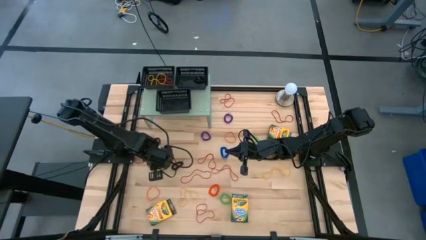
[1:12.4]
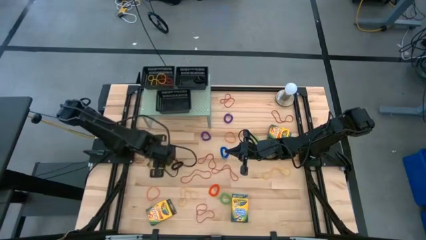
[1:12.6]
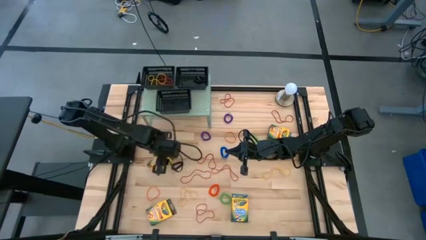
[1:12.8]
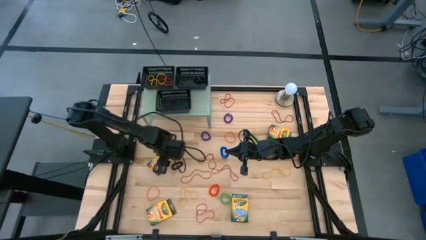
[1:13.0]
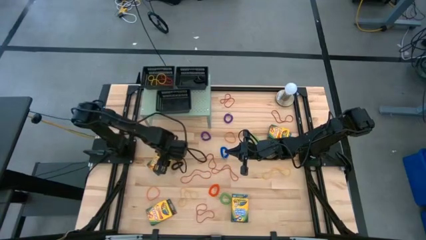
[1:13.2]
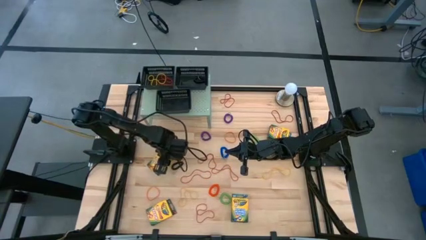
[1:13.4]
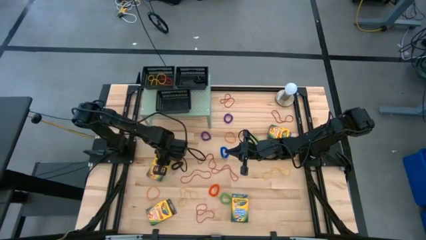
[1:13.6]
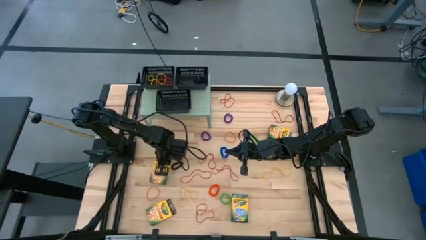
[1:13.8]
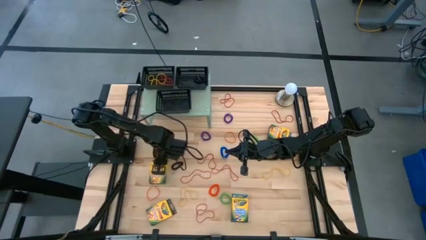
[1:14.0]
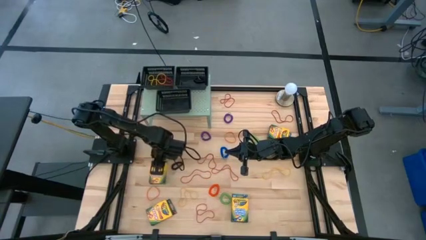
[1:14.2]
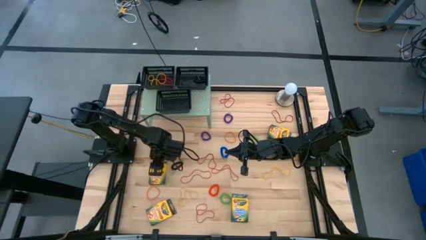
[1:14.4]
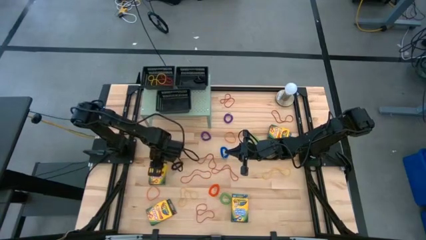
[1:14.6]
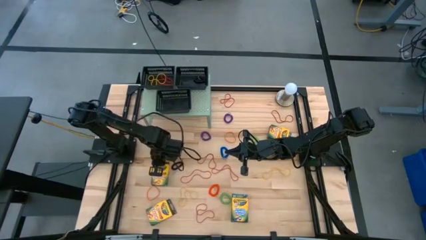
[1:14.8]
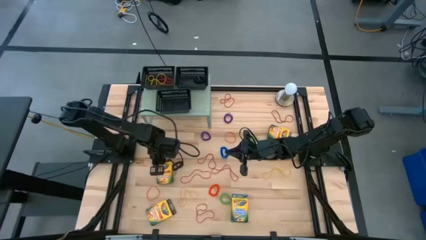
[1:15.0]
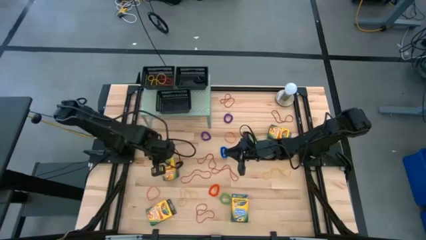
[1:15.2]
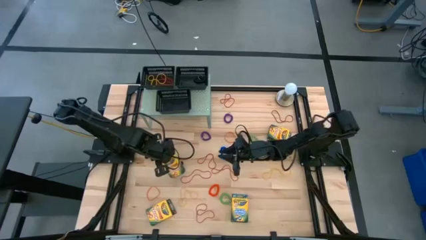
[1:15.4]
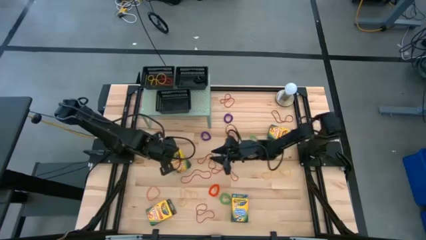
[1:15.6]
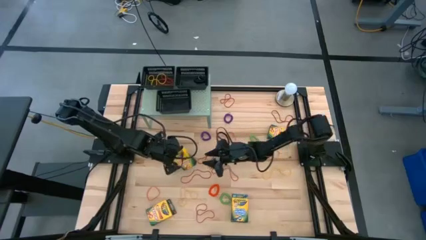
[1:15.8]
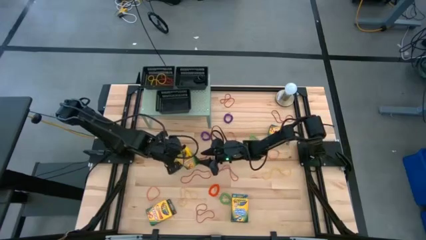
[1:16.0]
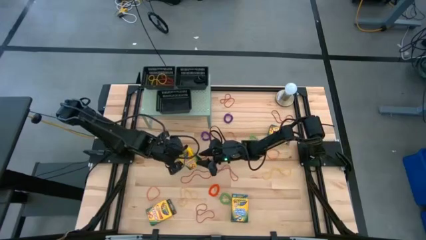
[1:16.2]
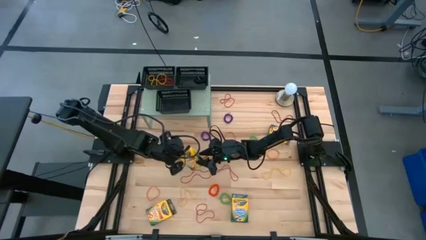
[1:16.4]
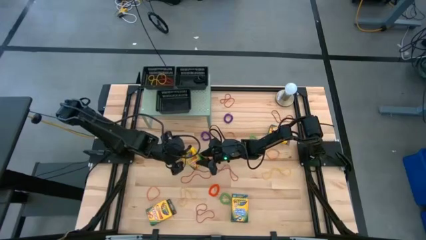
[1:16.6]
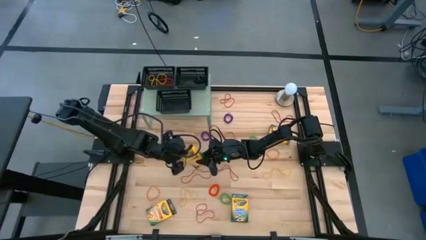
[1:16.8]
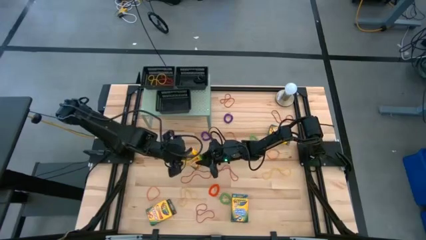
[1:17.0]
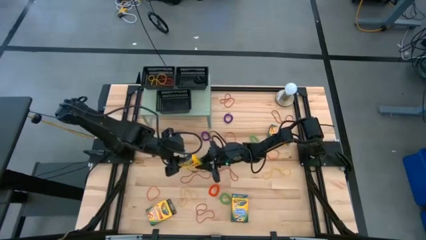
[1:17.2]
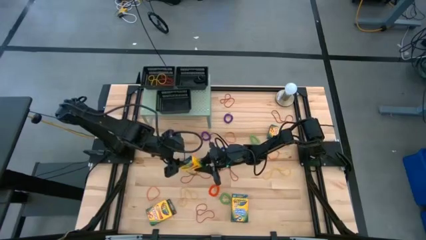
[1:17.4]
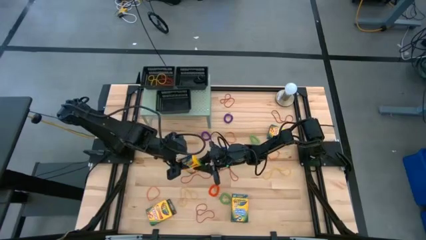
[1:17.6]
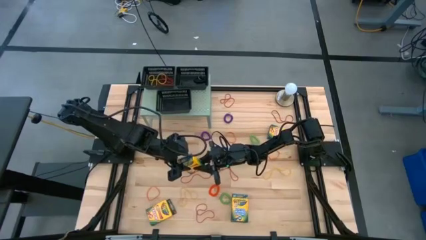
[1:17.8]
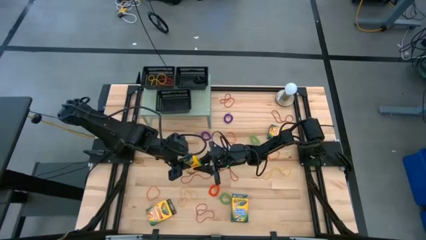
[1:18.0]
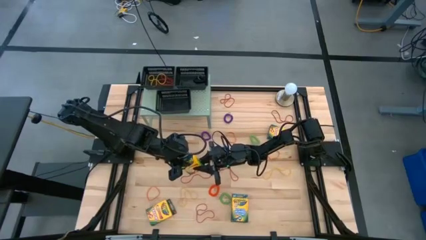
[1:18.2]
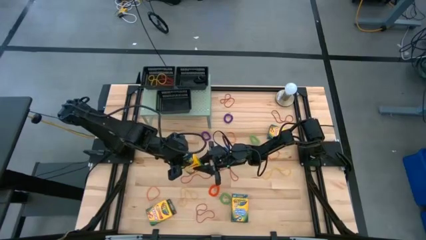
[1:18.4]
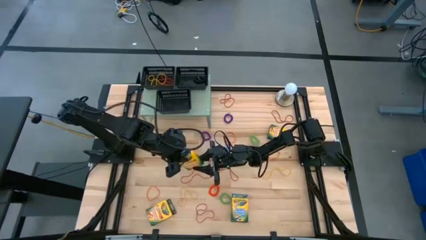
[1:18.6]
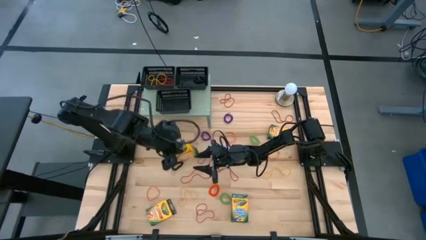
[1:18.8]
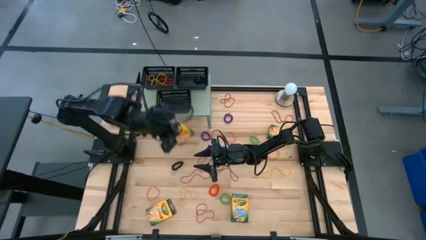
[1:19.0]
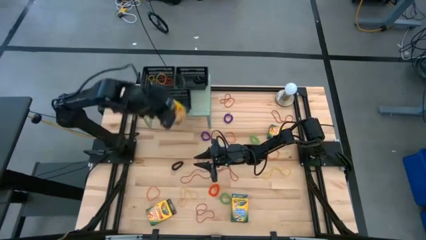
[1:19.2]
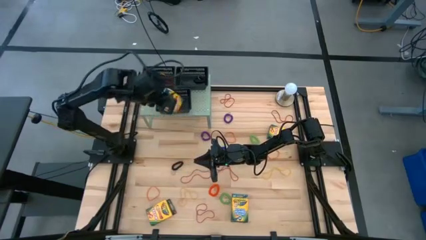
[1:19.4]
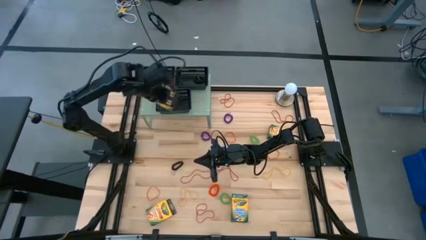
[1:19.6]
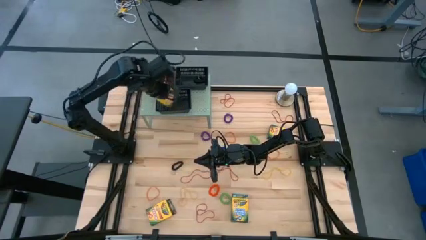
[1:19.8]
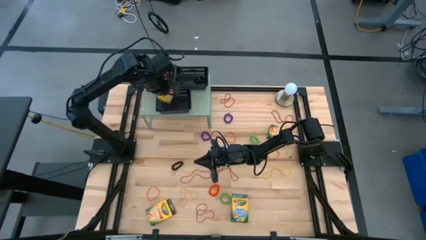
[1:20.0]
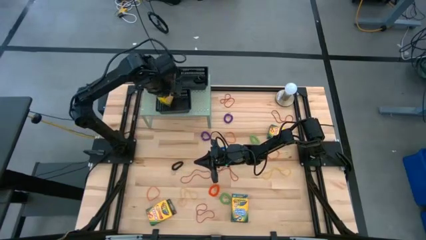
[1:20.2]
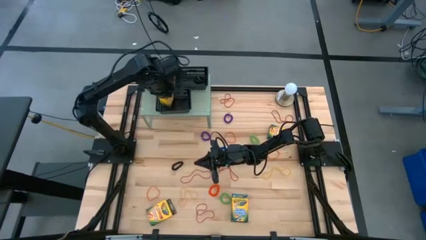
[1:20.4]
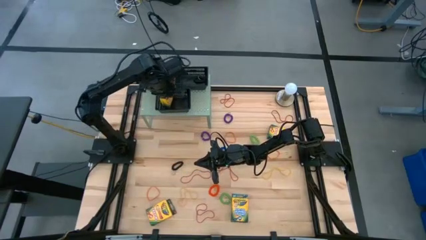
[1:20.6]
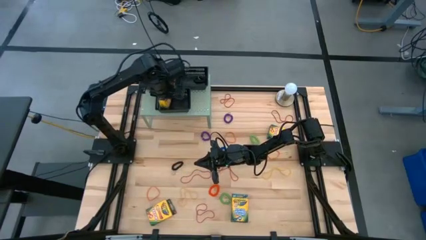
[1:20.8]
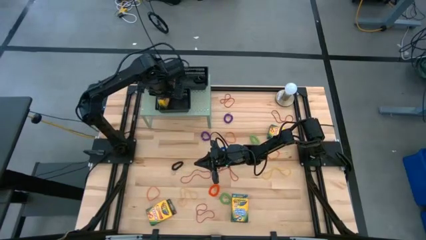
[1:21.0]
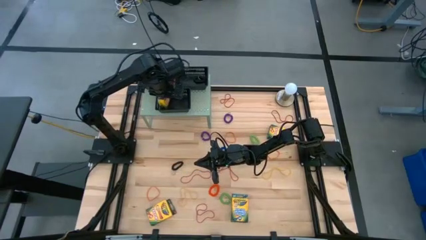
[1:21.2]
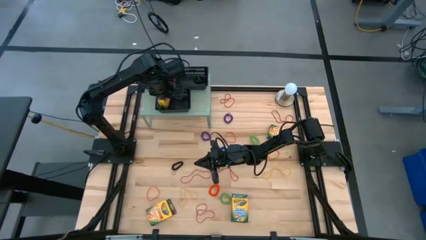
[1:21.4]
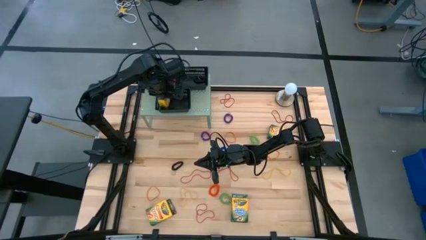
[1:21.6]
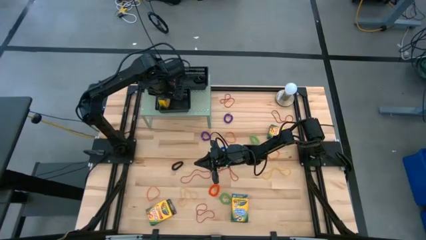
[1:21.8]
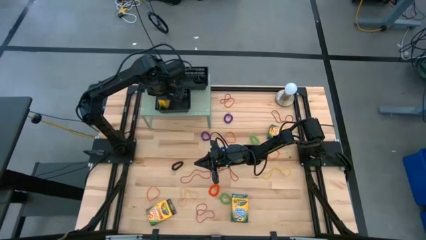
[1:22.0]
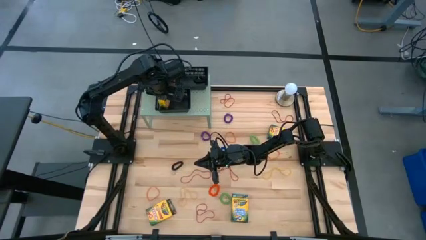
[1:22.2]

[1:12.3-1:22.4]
Task: Pick & Place Office Desk Supplies
Put the crayon box into the bottom black bin on the shelf

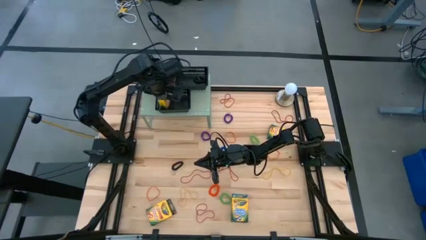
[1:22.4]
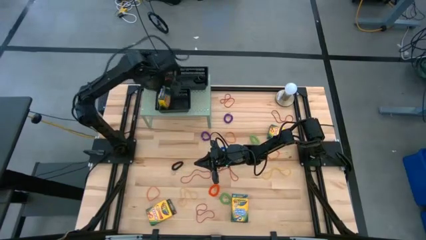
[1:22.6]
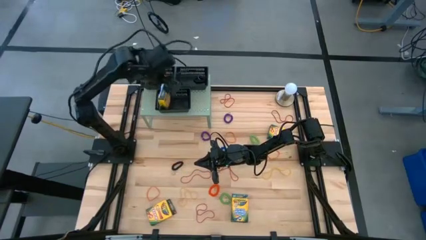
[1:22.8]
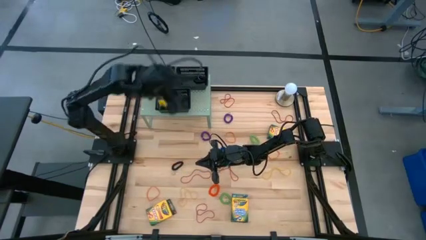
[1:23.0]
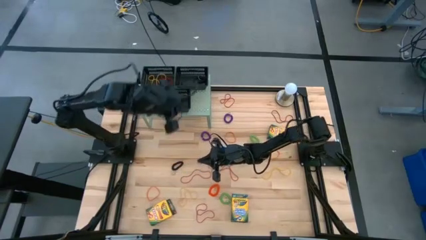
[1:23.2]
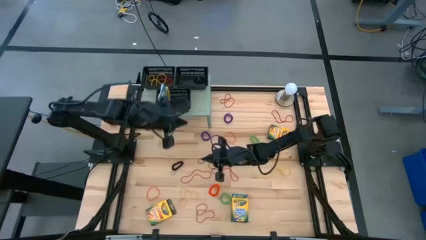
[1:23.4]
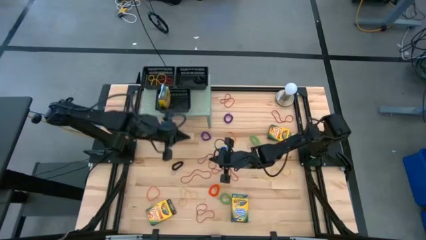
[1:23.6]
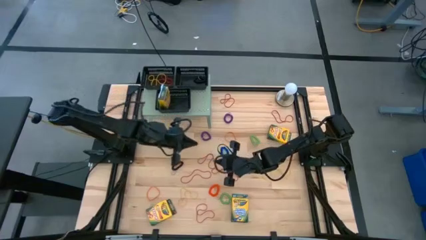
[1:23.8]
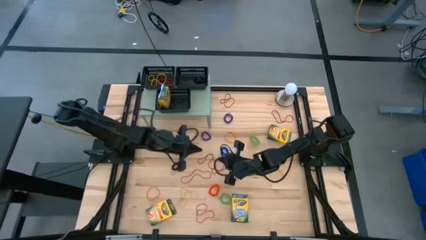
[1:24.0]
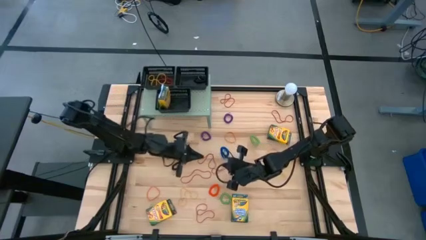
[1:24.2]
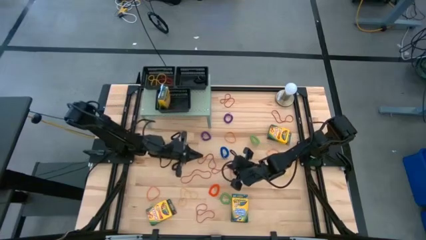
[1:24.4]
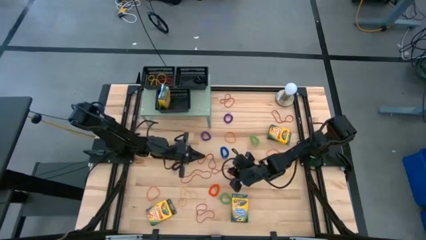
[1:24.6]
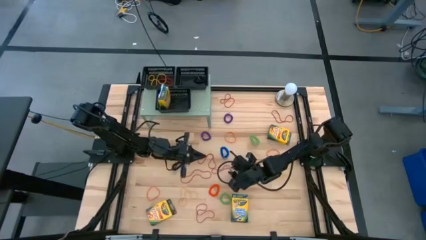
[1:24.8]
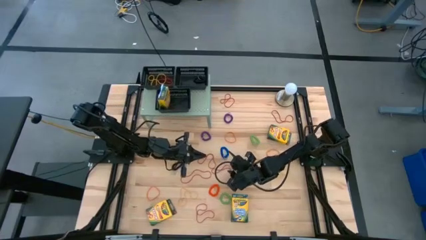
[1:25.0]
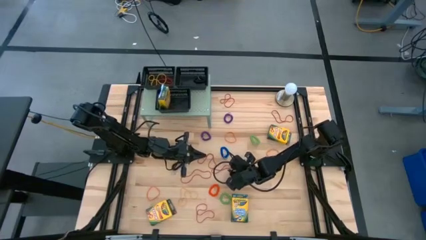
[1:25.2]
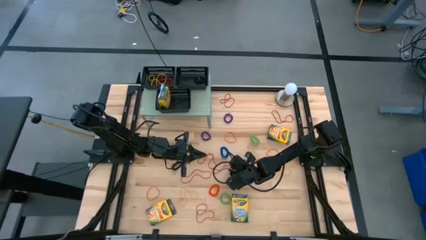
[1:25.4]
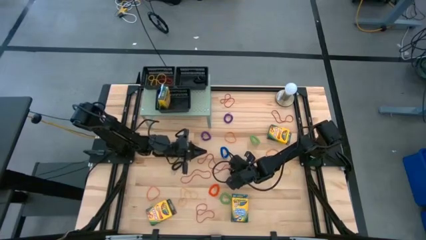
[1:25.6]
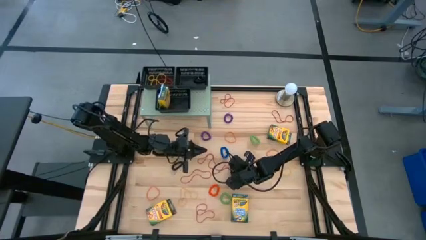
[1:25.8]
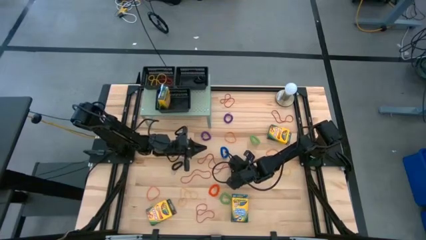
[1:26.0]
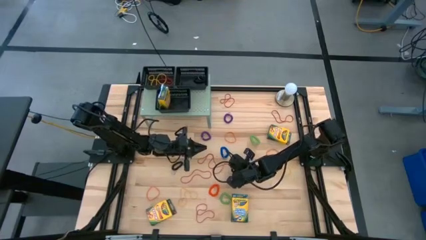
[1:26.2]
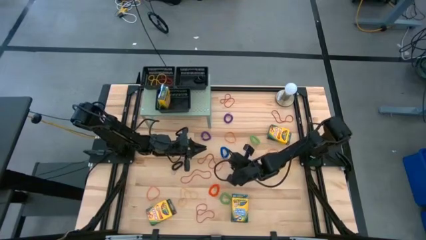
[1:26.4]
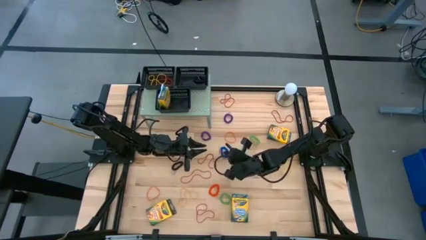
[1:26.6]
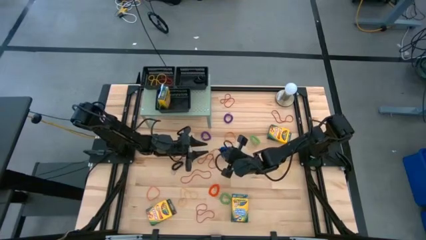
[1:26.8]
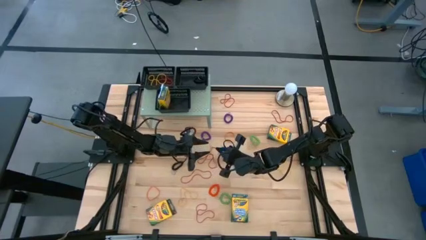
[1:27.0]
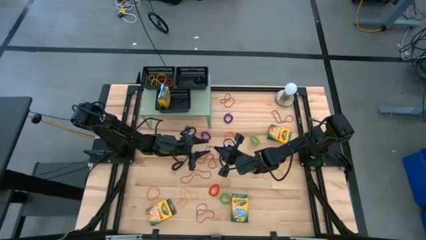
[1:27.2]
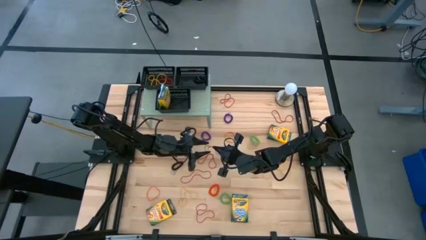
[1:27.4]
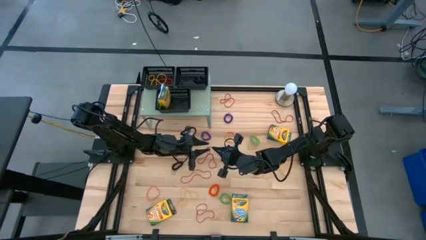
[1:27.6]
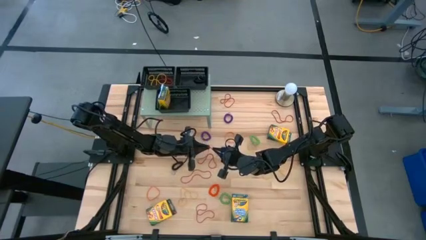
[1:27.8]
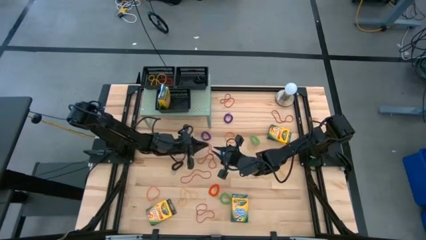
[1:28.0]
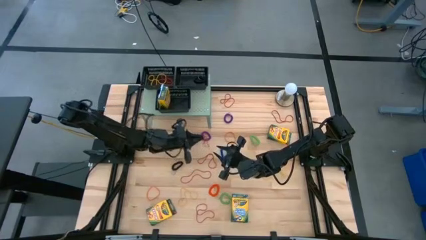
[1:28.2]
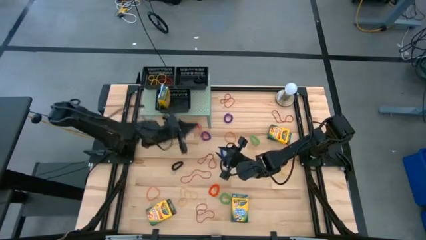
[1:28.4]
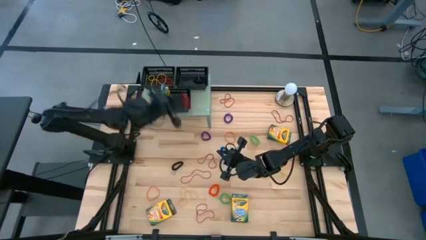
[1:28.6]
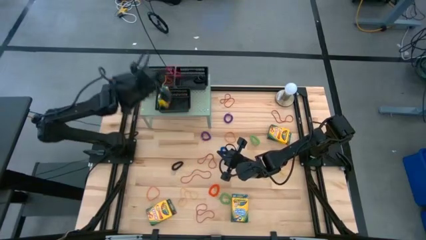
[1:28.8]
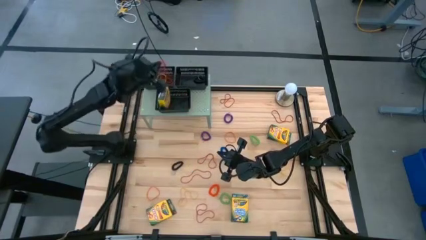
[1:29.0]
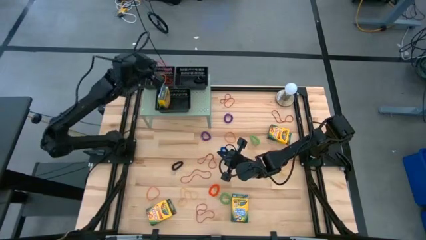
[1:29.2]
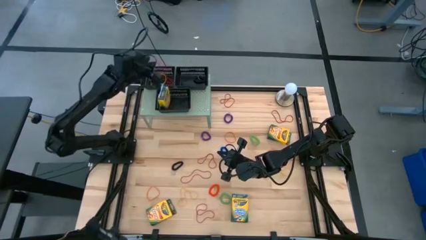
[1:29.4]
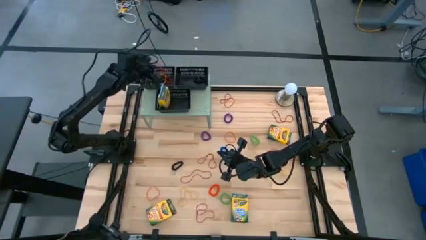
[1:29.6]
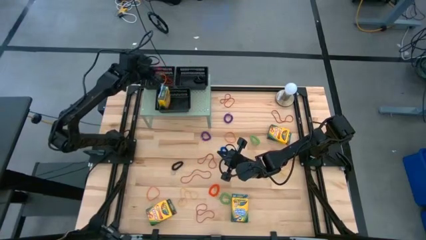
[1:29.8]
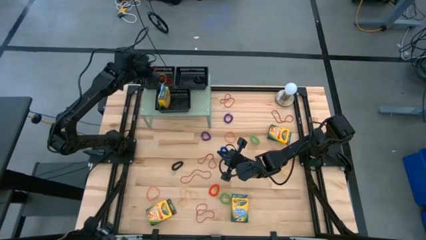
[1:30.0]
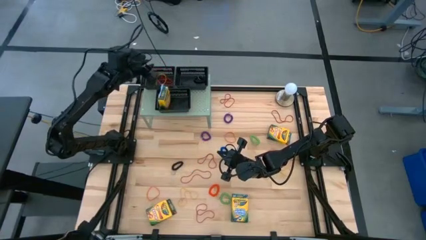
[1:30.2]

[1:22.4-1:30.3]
Put the red rubber band into the top left black bin on the shelf
